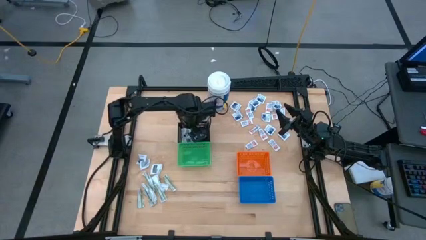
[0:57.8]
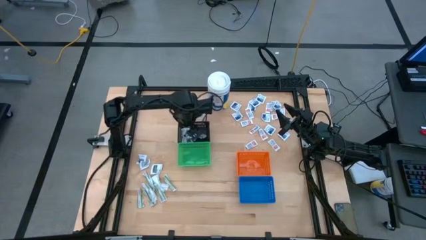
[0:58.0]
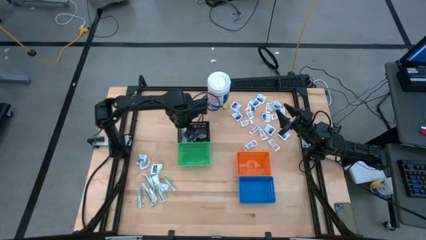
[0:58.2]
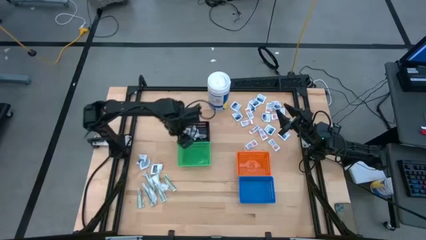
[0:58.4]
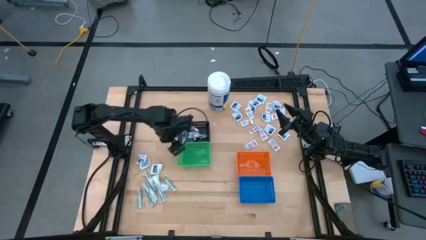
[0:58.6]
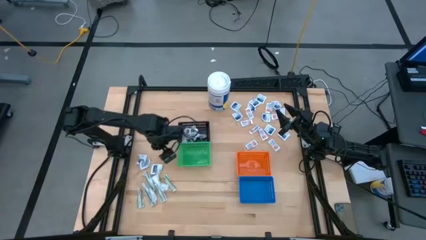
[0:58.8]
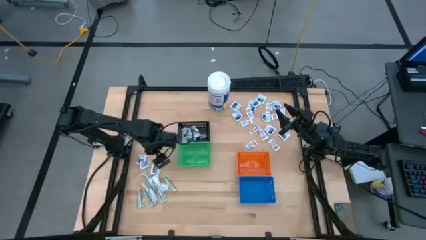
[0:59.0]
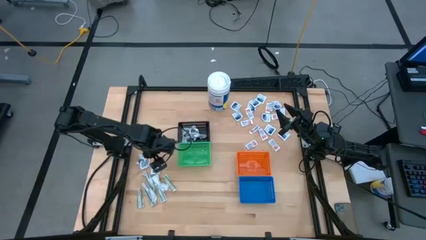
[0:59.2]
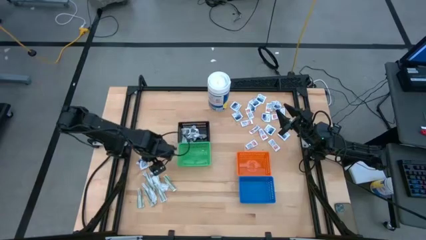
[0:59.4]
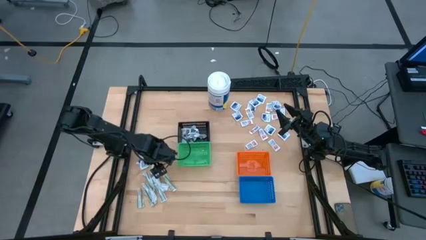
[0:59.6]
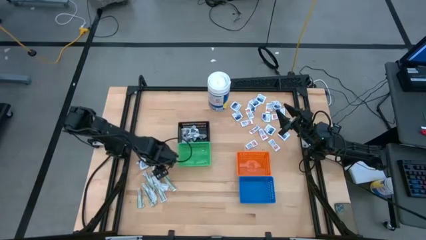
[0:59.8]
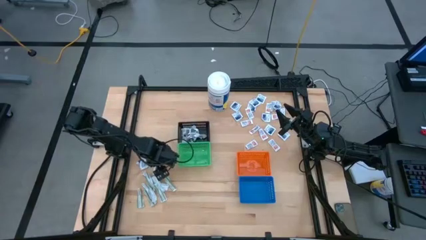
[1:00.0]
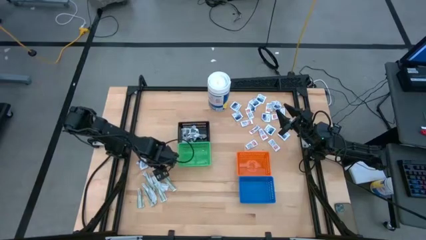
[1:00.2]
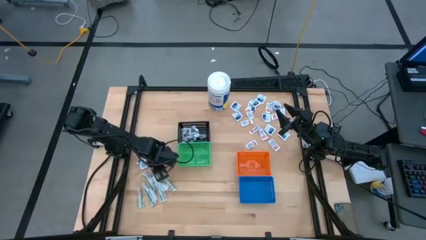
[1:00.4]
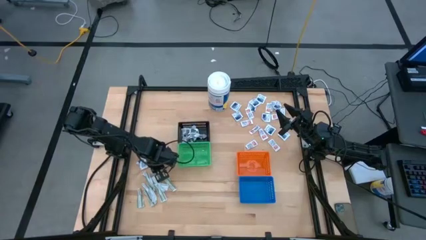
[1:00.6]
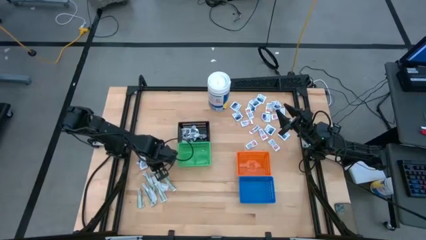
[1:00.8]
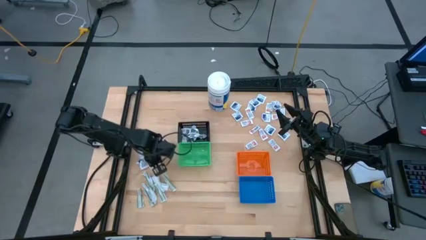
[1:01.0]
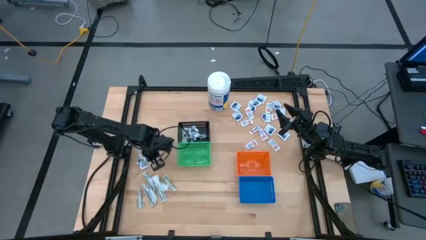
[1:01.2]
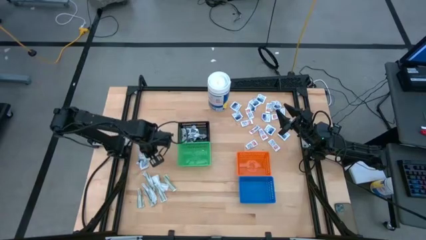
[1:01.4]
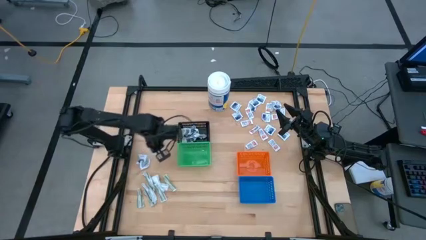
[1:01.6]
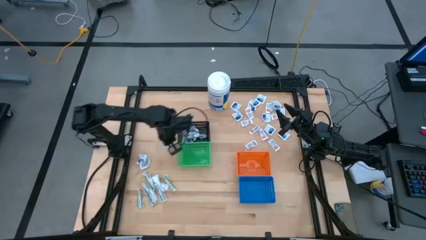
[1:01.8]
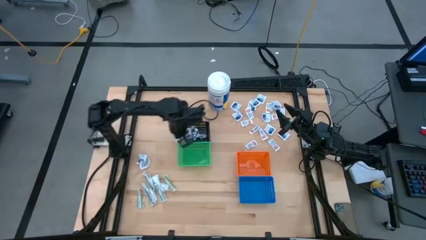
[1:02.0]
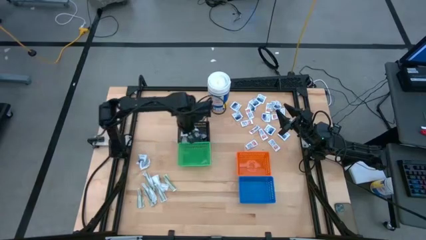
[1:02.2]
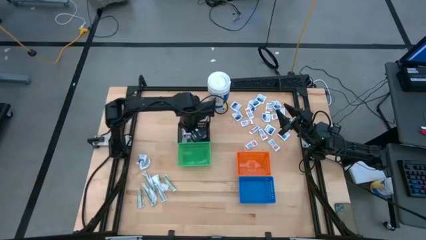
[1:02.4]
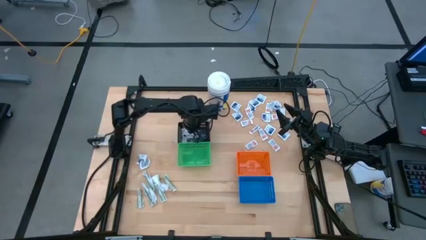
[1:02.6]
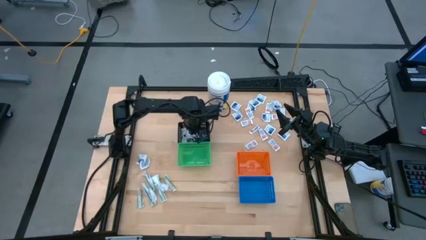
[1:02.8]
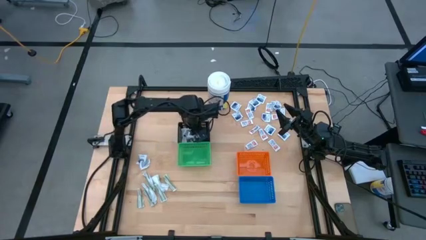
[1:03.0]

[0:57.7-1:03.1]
Task: Pick & Place First Aid Supplies
Put the black pad into the black bin

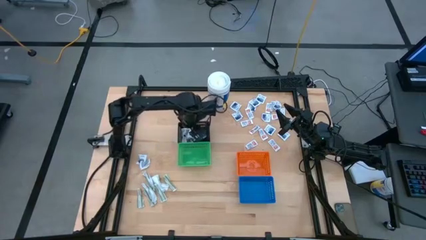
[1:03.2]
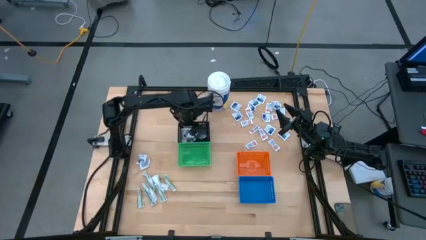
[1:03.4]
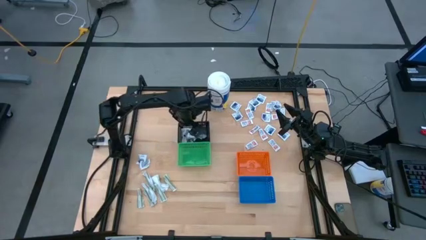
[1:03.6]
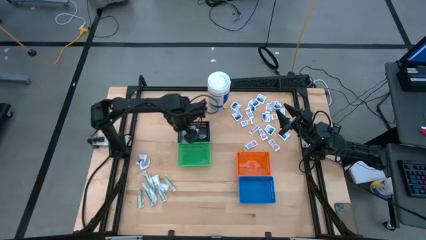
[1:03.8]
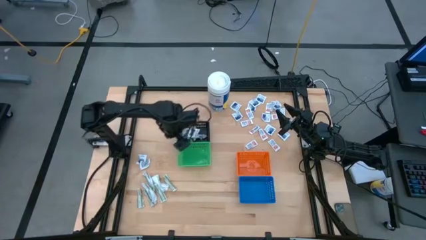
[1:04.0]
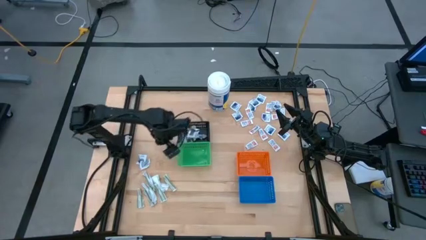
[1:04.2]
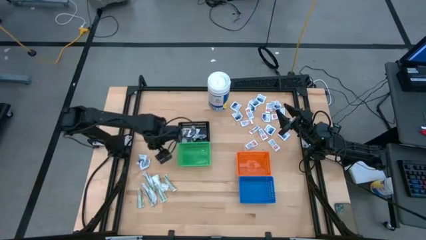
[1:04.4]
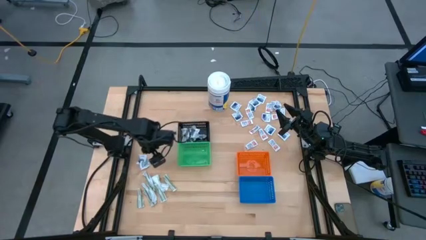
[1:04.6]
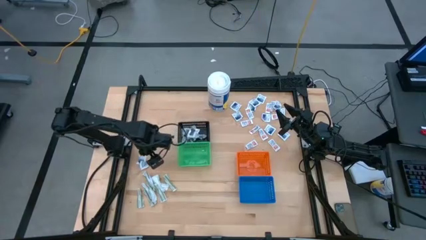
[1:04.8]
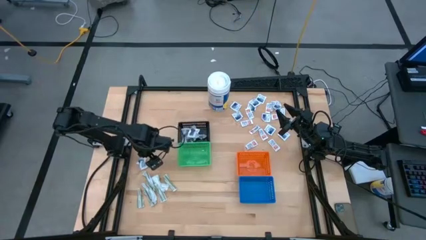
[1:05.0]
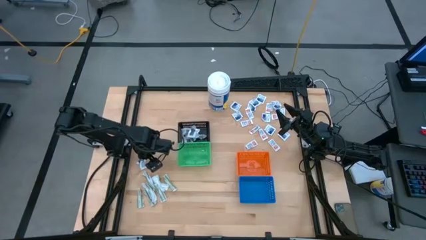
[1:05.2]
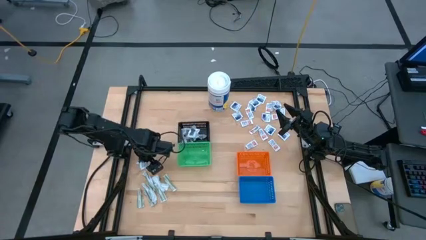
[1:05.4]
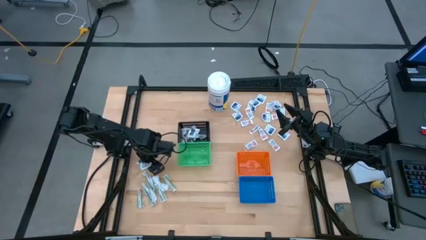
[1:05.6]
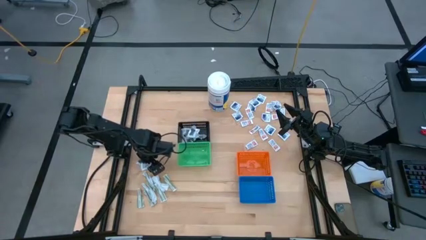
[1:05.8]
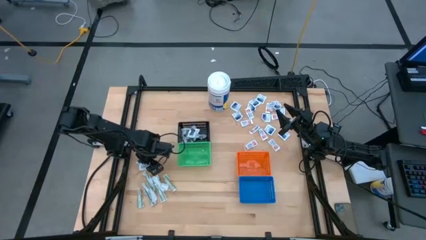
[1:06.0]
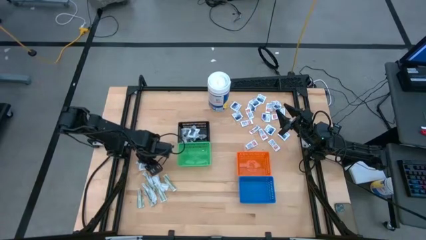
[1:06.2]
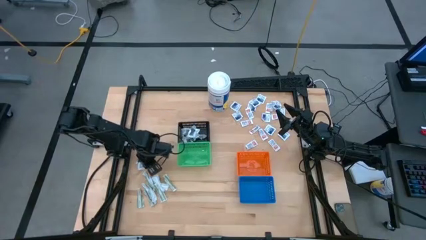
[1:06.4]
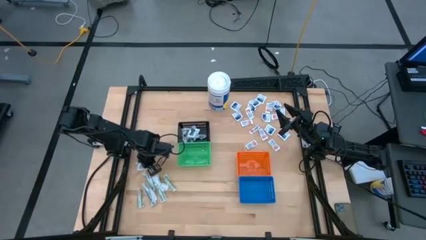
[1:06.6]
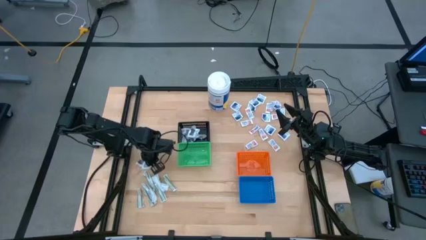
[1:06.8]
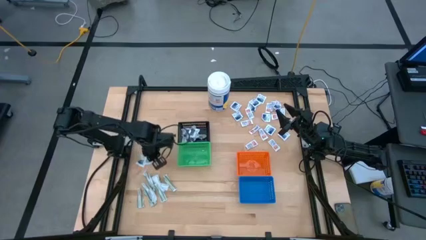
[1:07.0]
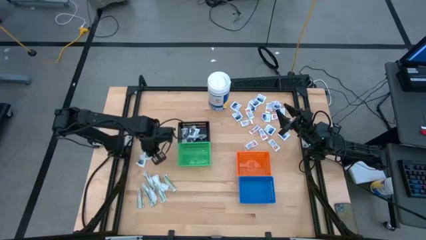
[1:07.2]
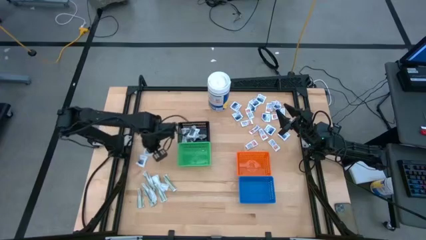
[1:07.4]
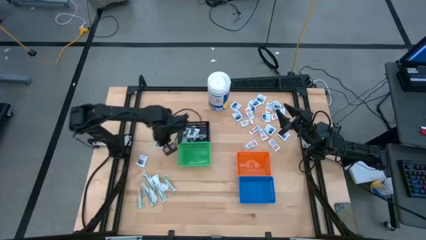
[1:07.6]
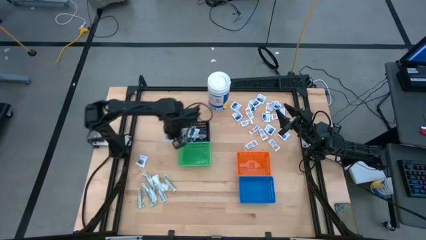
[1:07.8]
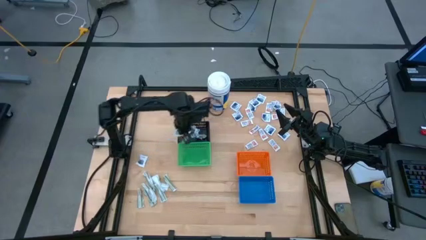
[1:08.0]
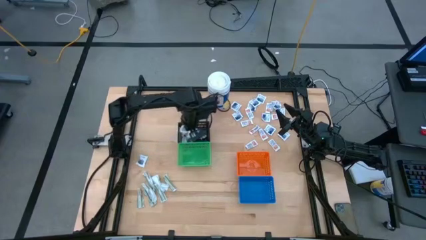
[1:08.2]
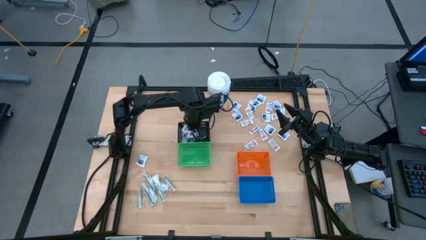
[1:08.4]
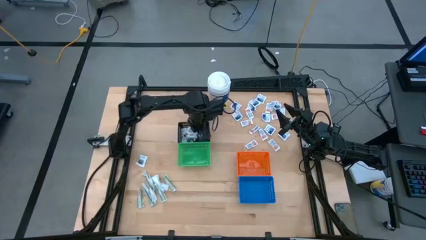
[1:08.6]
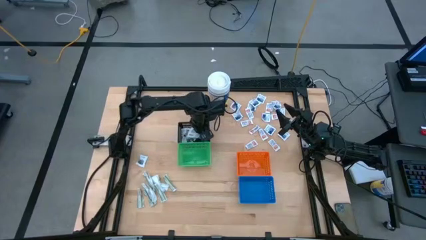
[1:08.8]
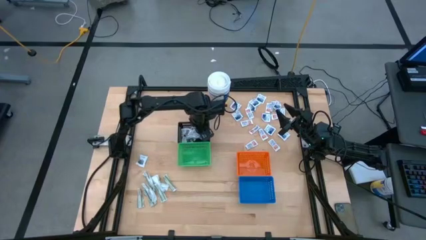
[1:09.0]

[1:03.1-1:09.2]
Put the black pad into the black bin

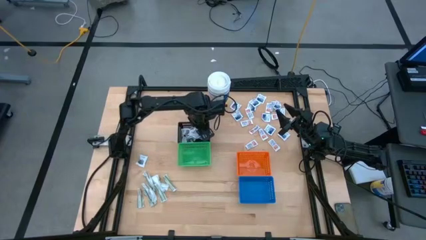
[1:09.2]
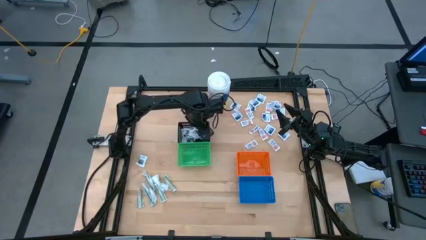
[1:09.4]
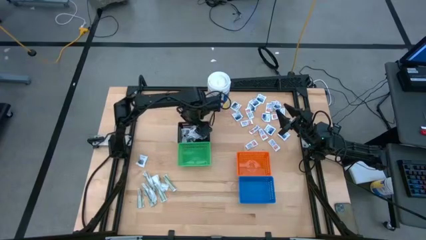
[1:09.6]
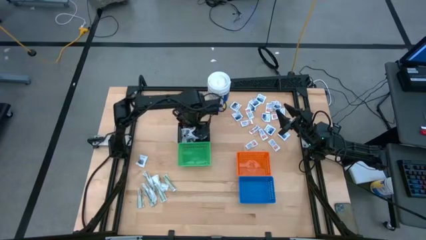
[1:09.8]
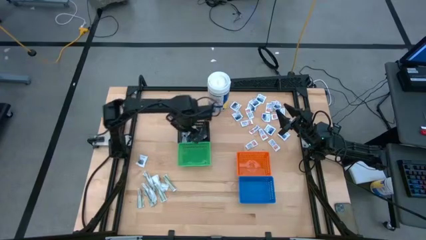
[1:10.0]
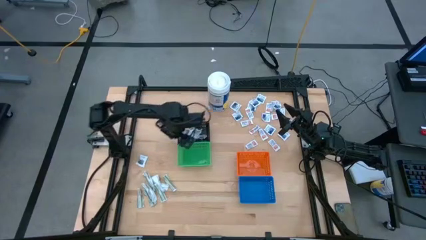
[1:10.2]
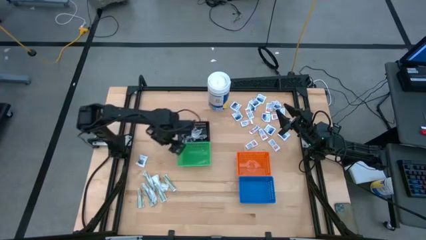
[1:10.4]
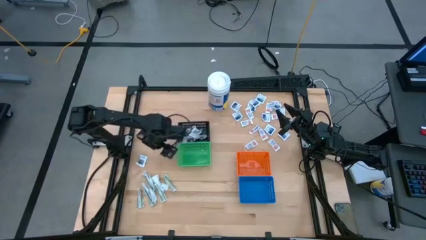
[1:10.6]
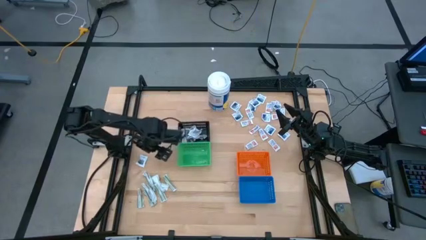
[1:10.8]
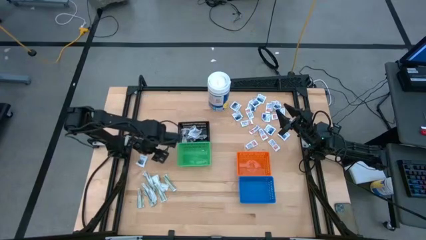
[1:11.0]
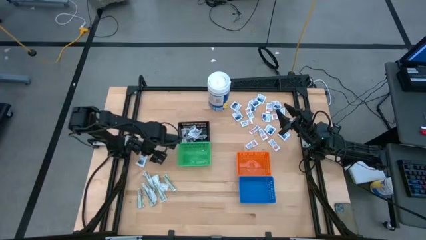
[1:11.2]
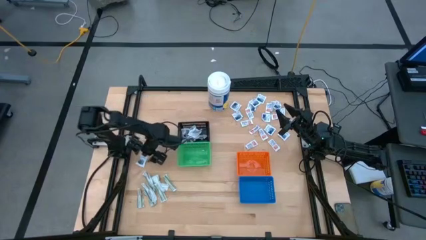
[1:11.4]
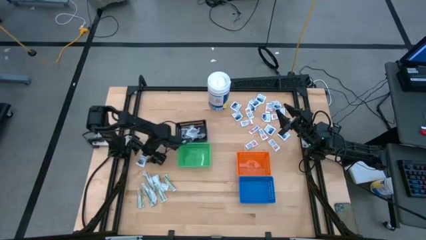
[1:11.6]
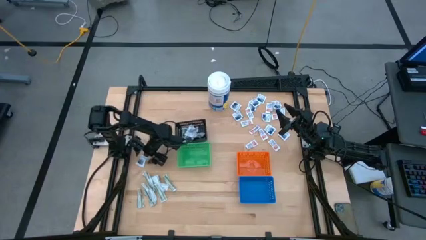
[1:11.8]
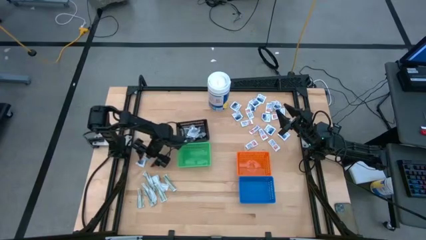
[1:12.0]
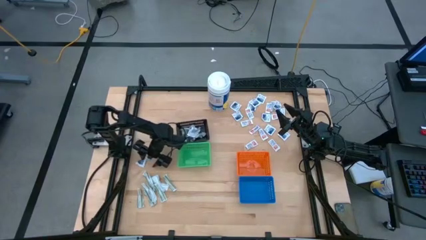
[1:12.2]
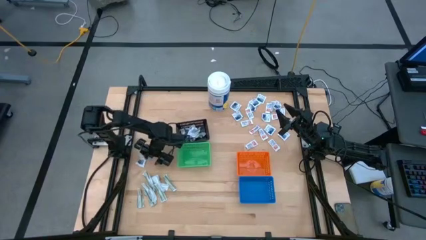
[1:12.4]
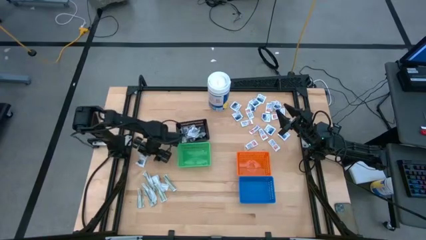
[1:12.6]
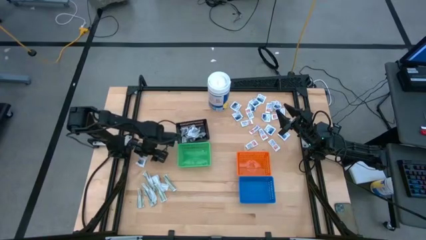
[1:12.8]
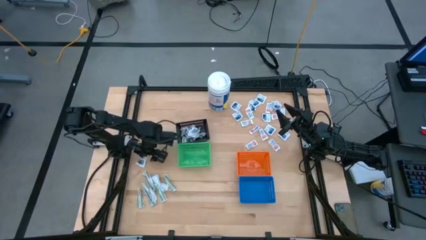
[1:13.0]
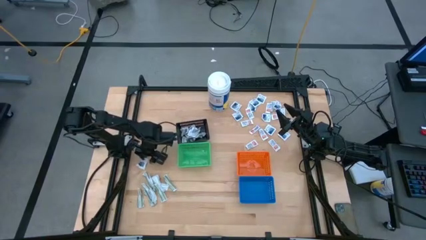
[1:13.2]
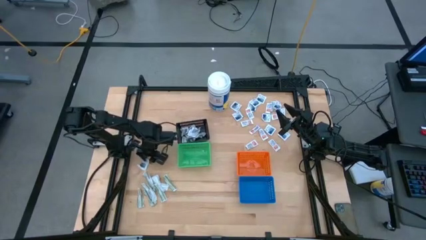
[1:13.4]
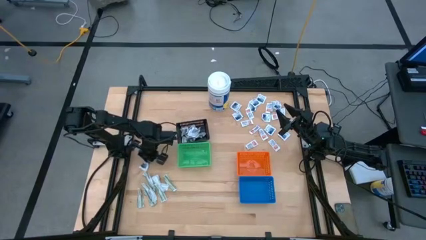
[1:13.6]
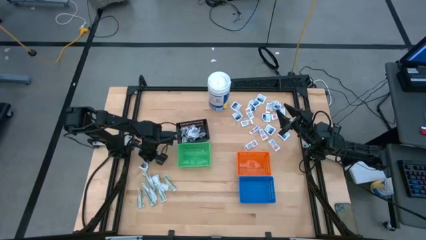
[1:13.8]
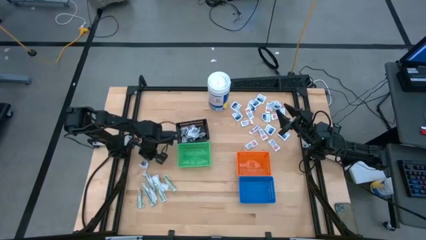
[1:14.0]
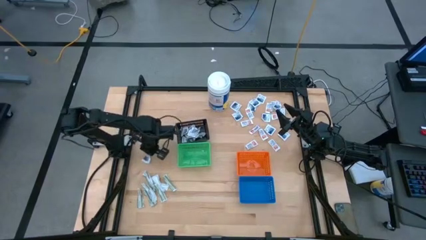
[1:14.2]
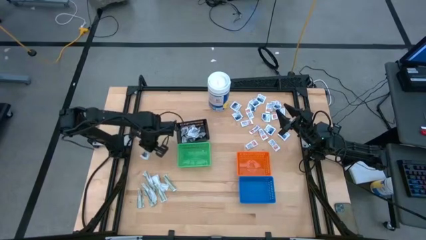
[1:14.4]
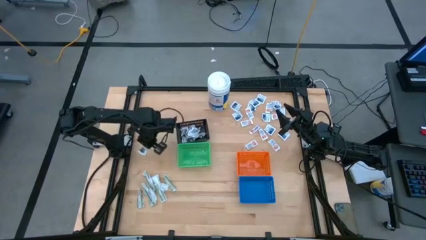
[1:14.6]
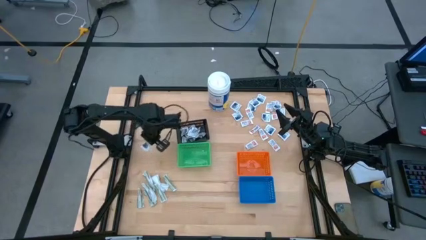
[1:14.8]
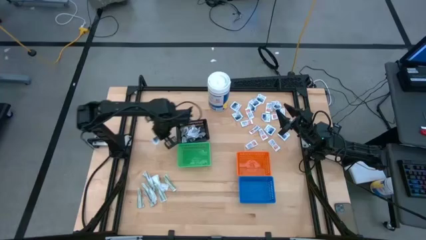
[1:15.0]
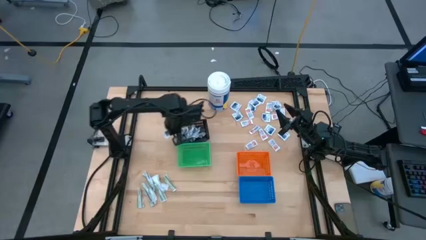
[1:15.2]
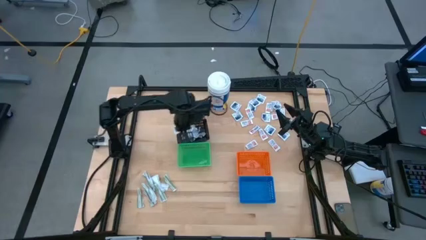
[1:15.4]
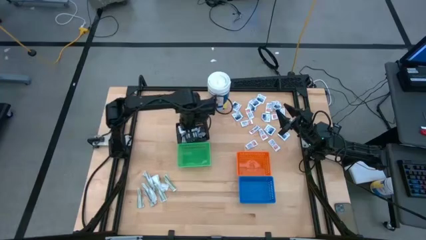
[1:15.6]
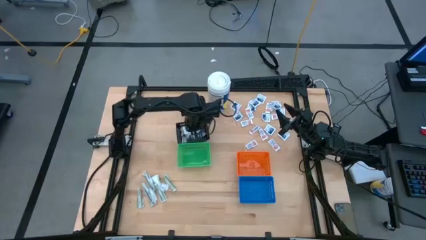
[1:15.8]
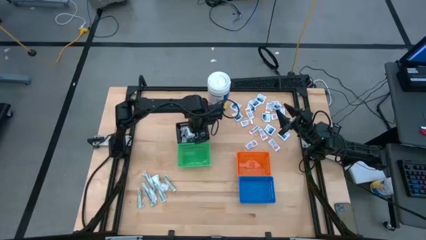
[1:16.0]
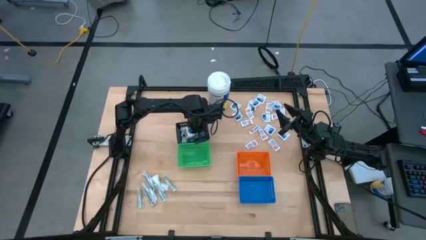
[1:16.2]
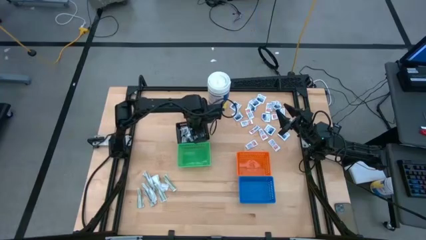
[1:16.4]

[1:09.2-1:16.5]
Put the black pad into the black bin
